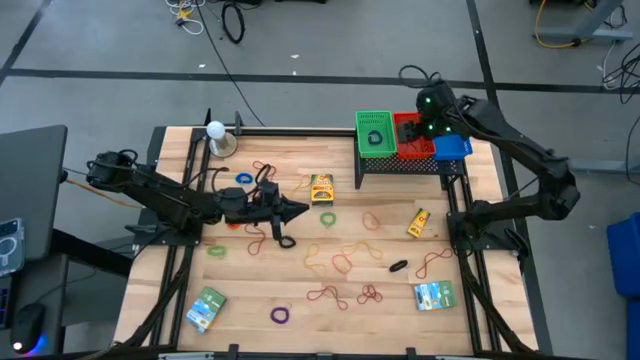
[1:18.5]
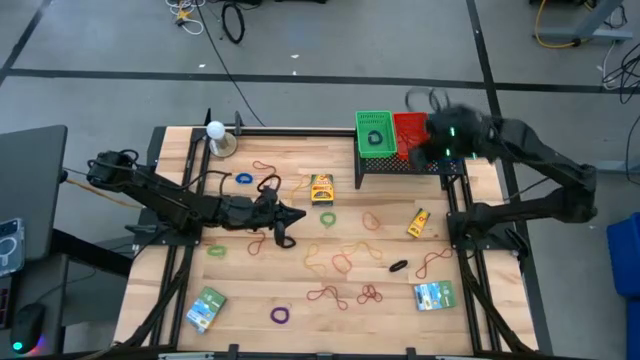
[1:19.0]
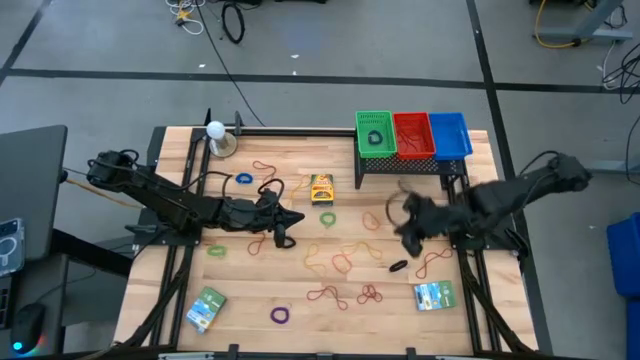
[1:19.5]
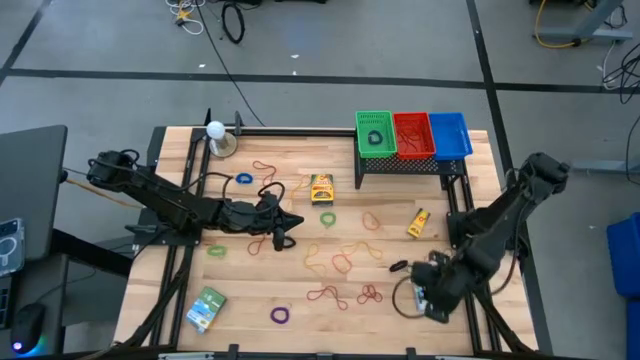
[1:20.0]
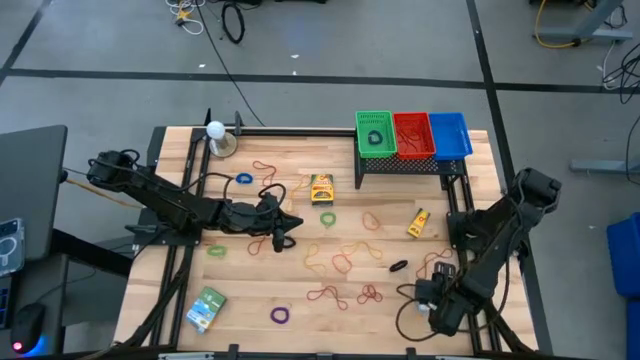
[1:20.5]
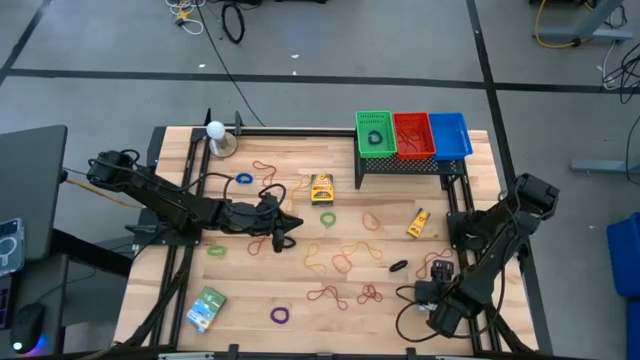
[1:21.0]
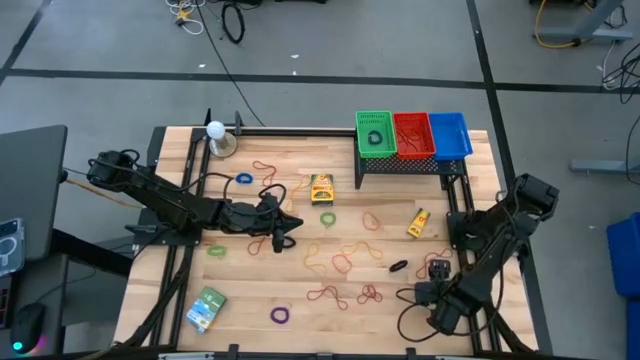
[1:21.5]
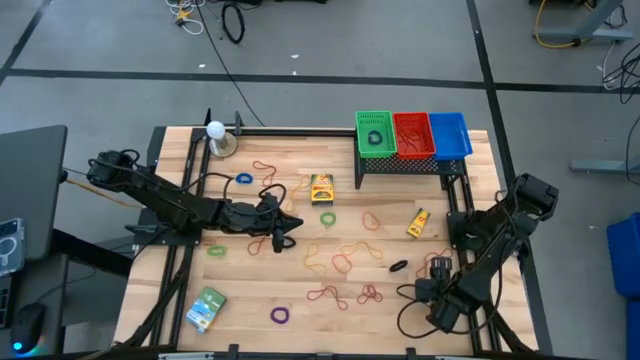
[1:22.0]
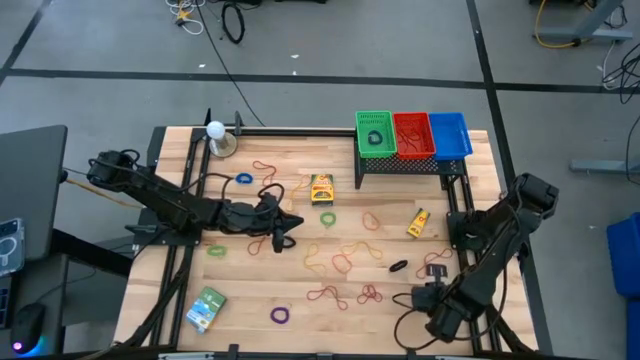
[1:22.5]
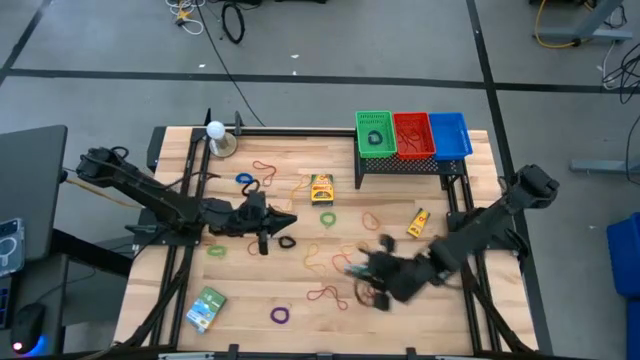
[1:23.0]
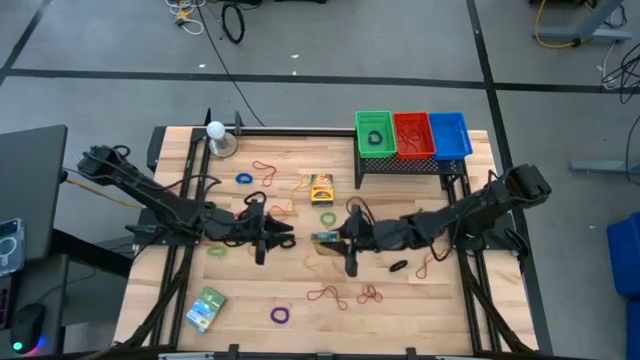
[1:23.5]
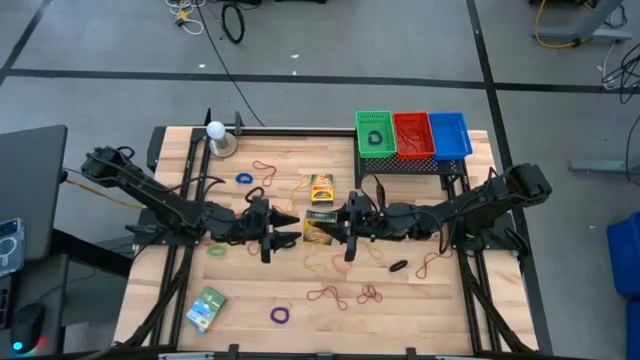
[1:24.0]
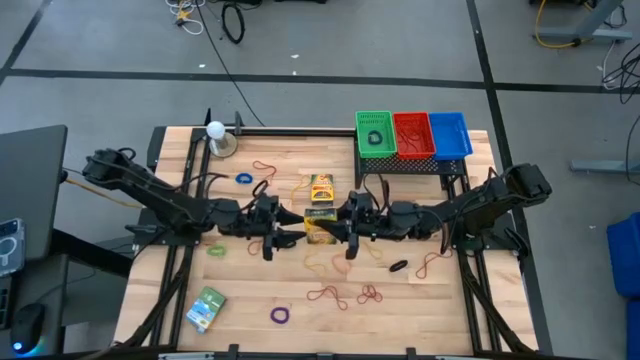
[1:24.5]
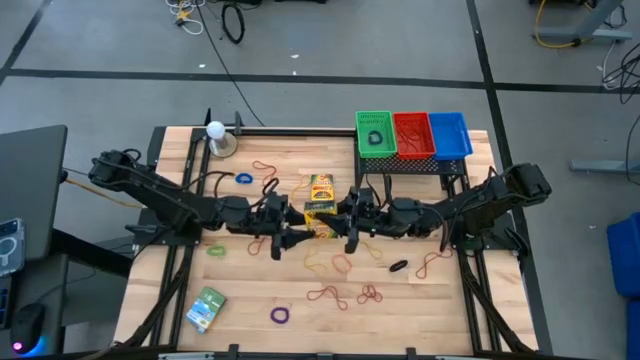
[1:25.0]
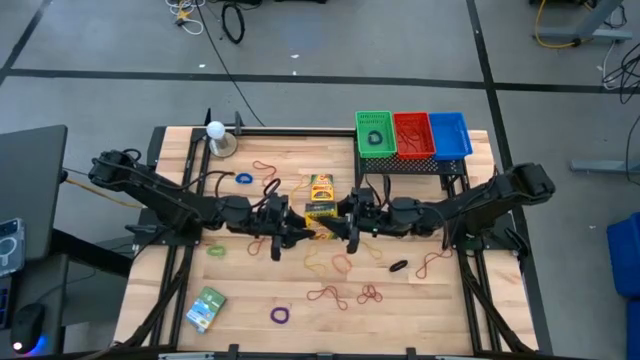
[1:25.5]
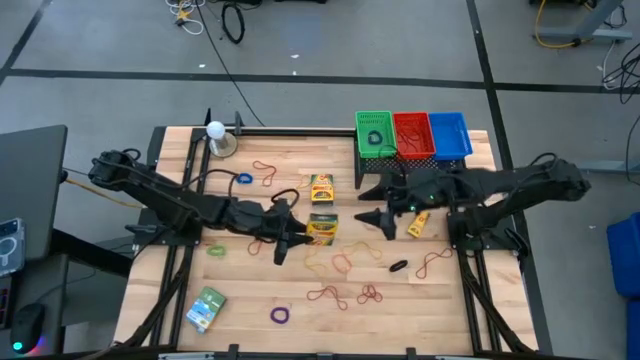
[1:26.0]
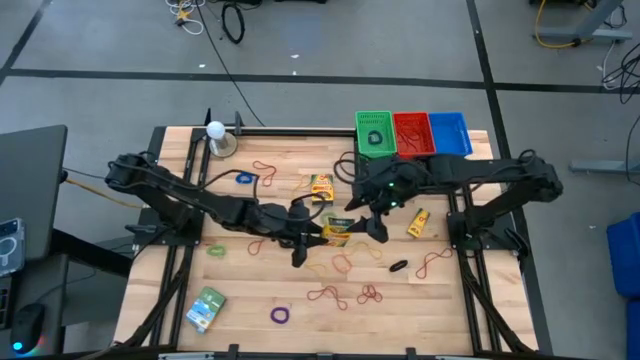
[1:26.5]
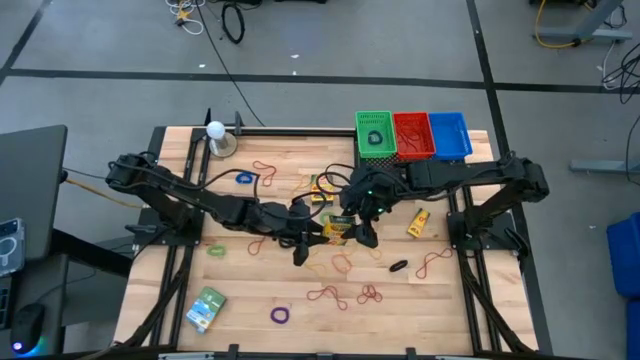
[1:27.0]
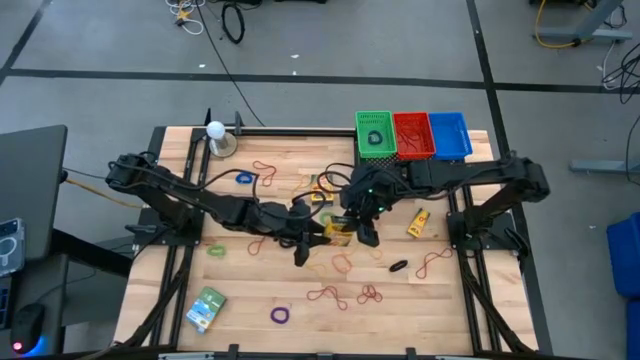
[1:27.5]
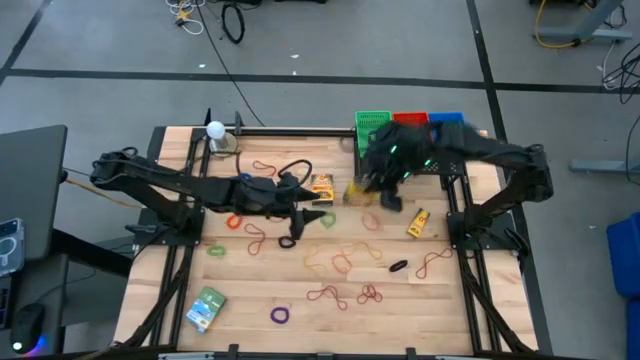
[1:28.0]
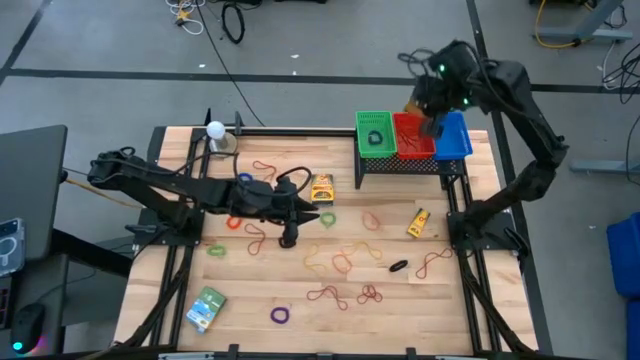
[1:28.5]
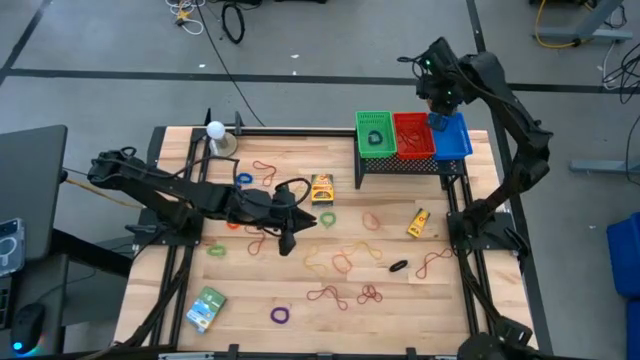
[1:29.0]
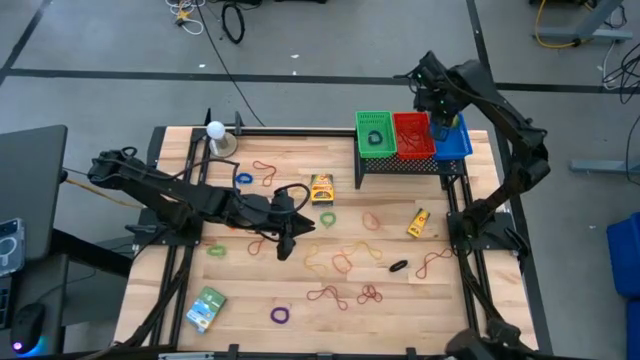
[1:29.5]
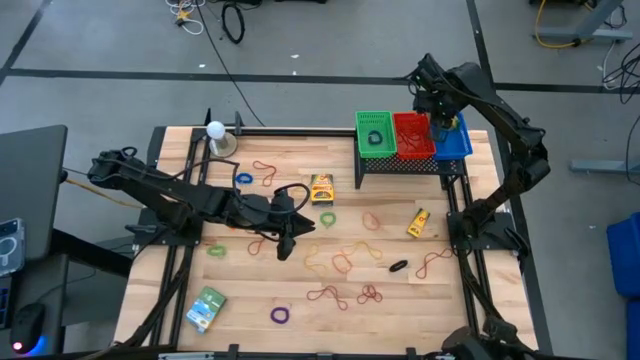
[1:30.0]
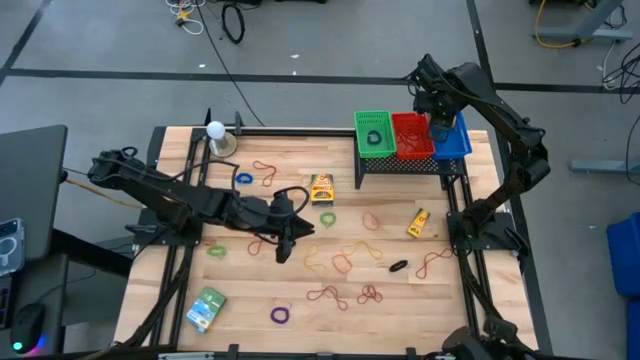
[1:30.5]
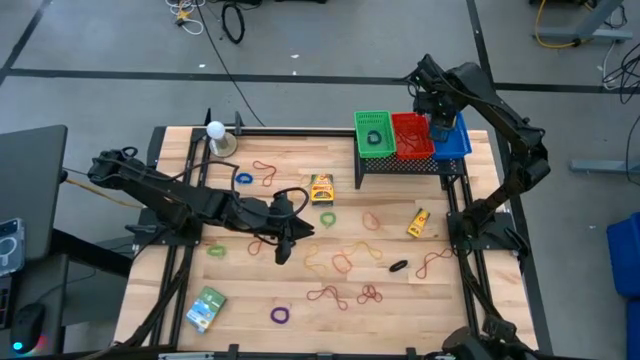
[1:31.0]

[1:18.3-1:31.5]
Task: Pick & Place Office Desk Supplies
Put the large crayon box into the blue bin

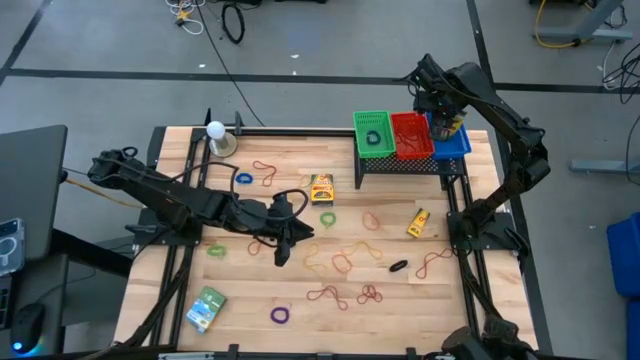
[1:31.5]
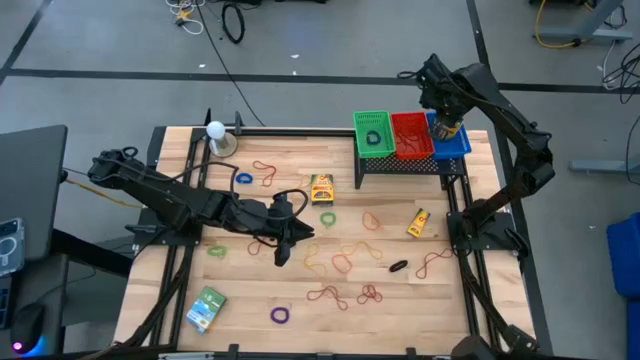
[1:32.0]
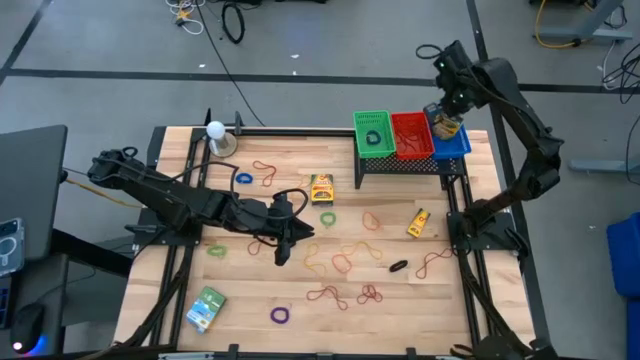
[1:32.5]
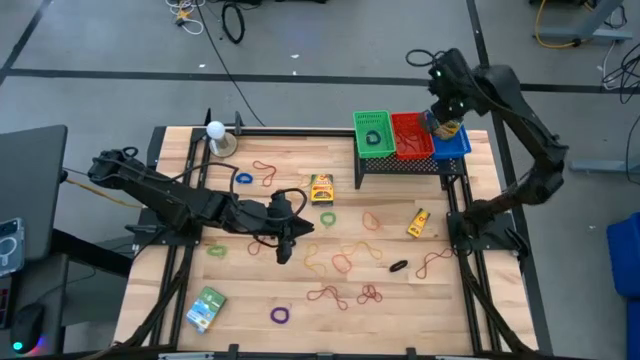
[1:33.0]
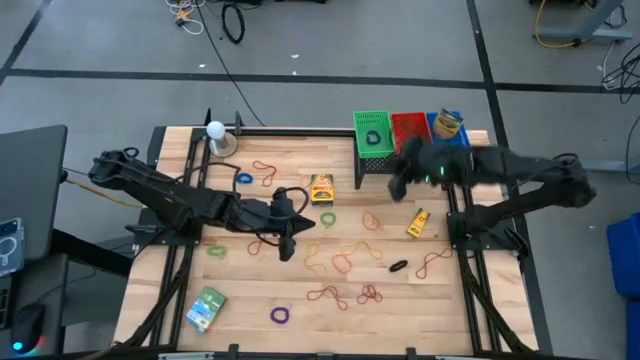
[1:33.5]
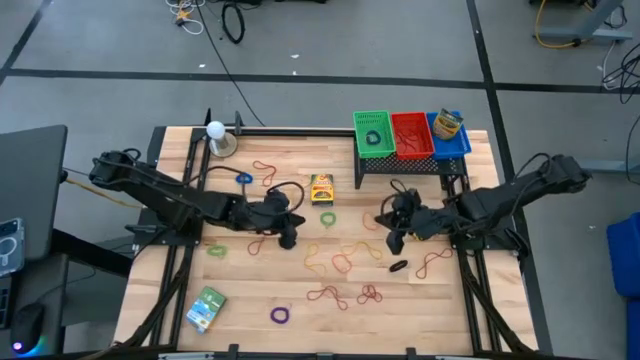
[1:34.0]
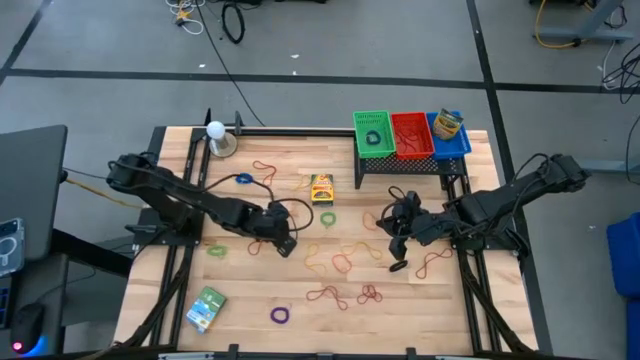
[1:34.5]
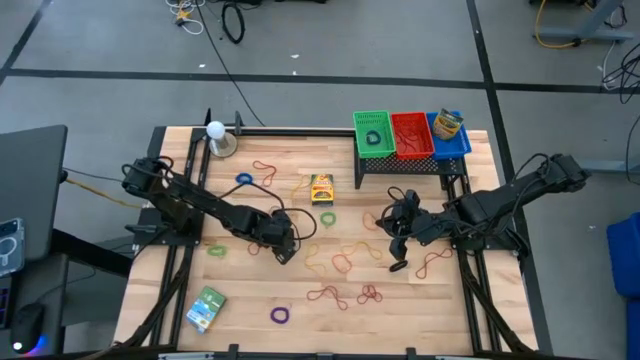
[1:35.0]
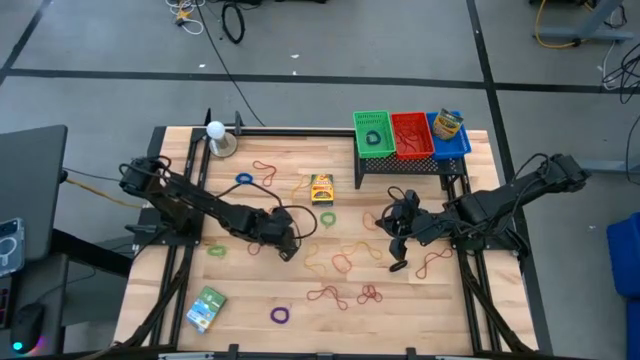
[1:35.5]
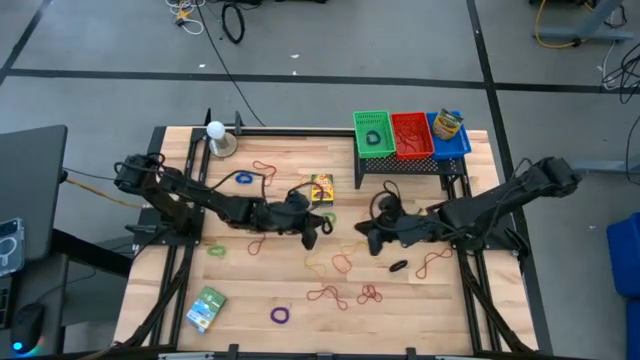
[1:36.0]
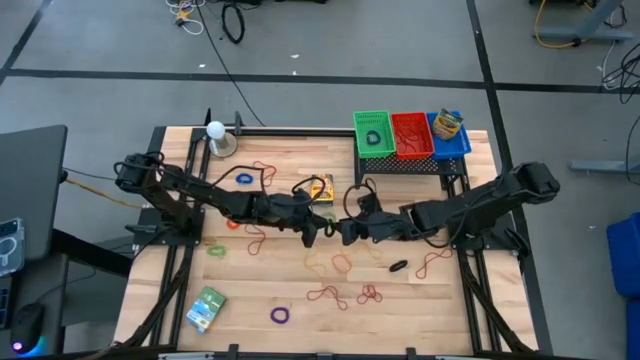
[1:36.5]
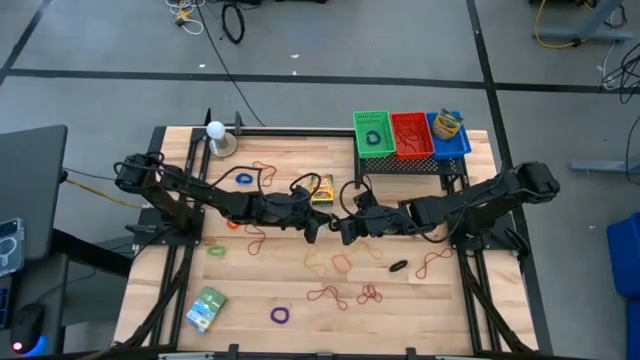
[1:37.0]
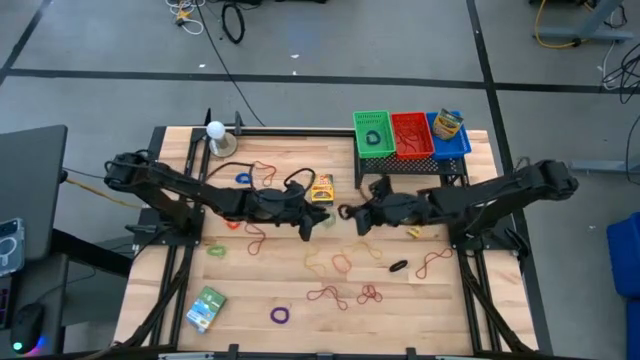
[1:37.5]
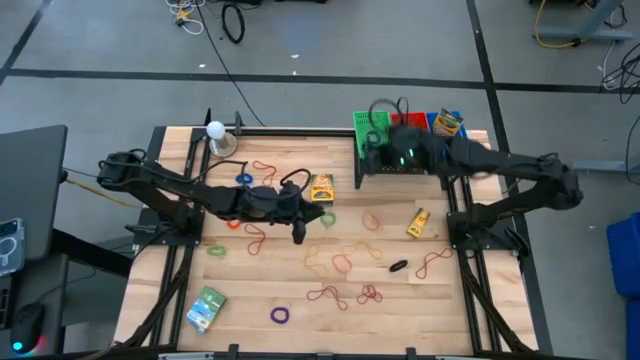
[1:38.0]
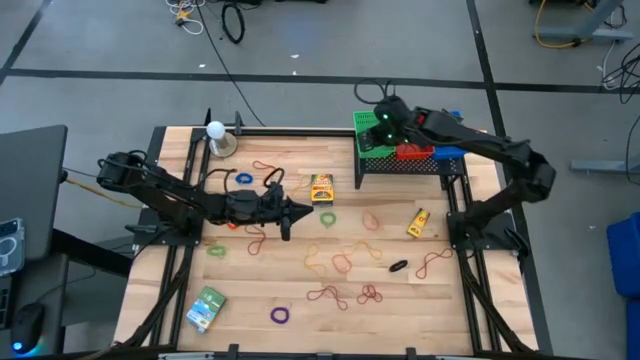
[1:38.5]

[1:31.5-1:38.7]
Put the black spring keychain into the green bin

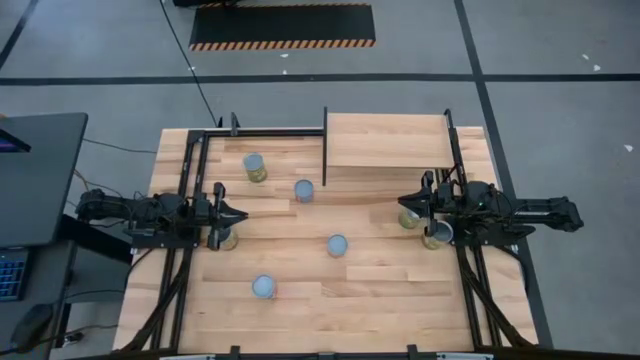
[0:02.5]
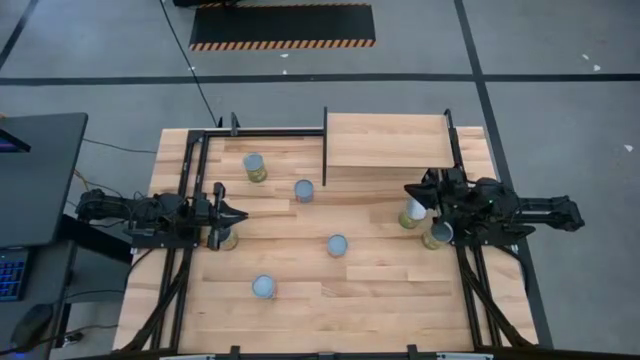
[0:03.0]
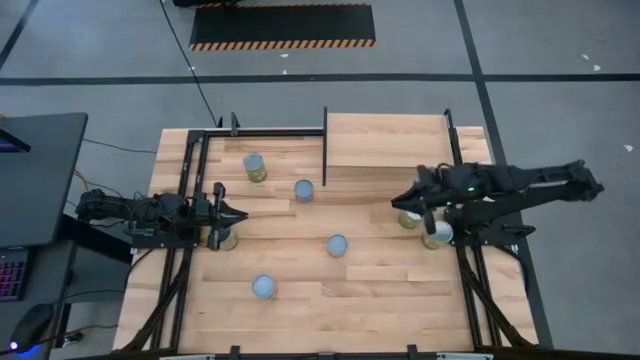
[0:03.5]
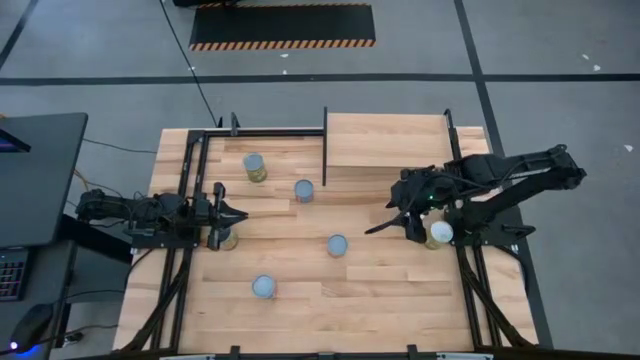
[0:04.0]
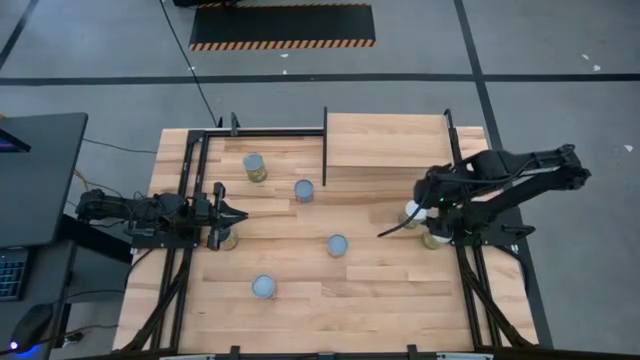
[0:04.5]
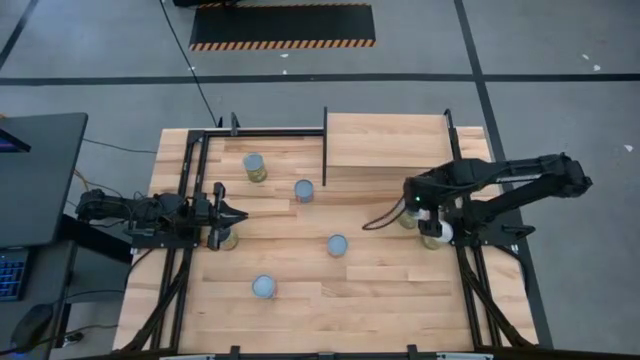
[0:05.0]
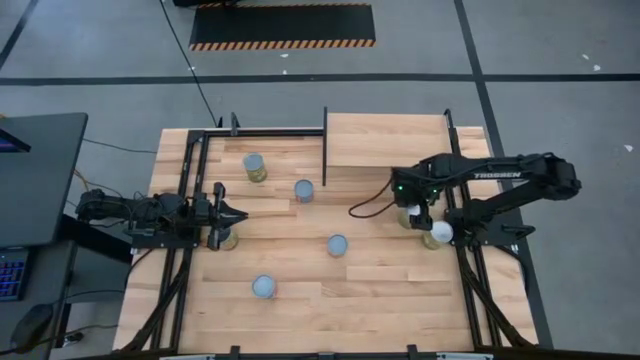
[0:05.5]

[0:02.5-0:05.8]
Task: Pick and place cans onto a shelf
Put the right large canned oranges can on the shelf
